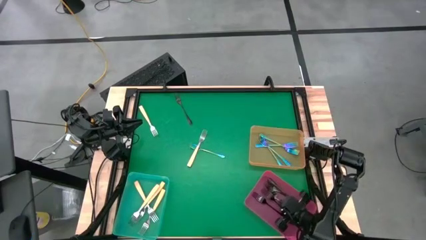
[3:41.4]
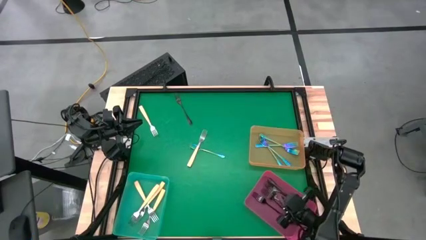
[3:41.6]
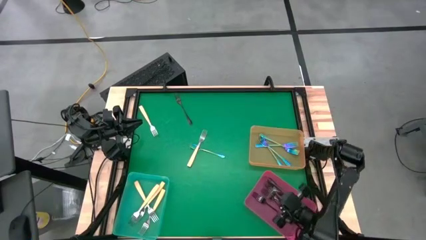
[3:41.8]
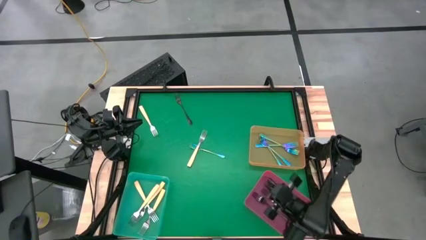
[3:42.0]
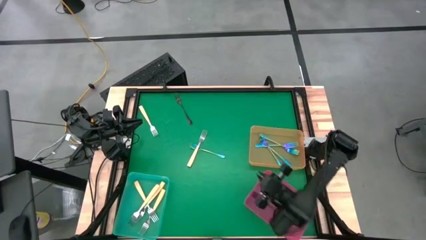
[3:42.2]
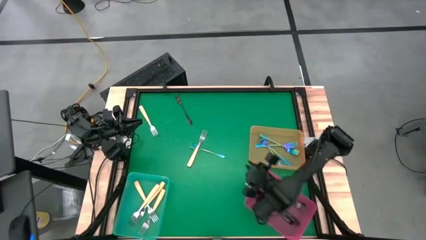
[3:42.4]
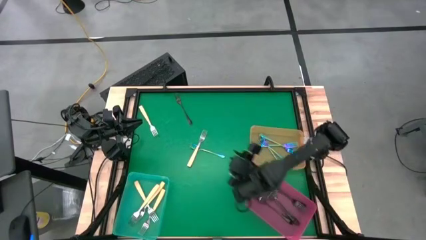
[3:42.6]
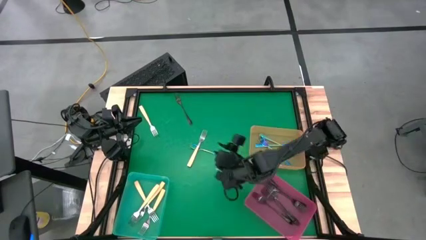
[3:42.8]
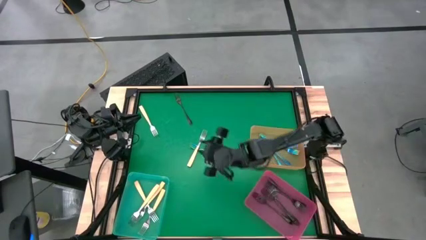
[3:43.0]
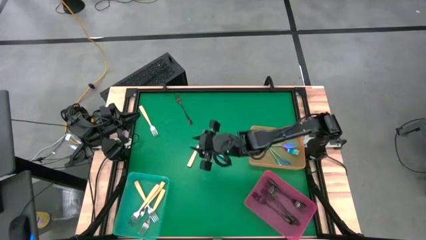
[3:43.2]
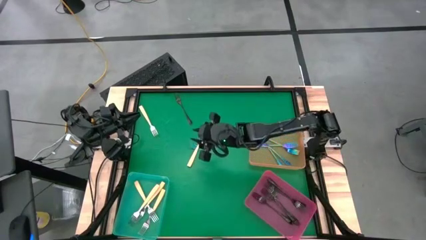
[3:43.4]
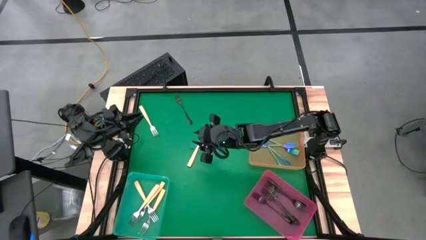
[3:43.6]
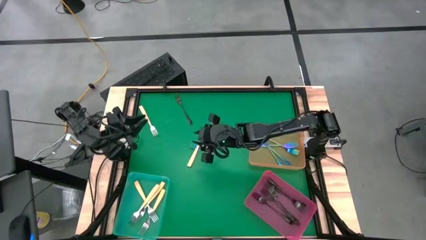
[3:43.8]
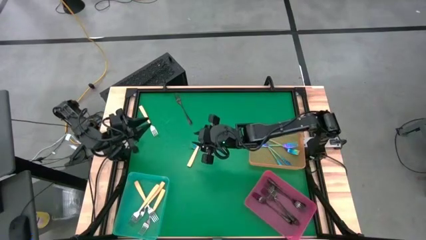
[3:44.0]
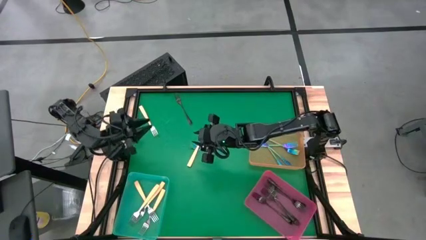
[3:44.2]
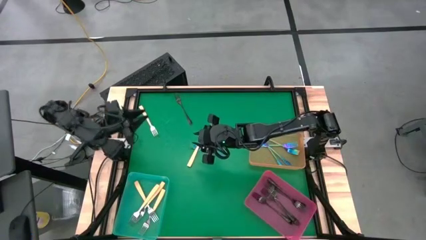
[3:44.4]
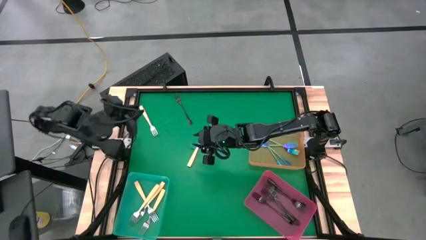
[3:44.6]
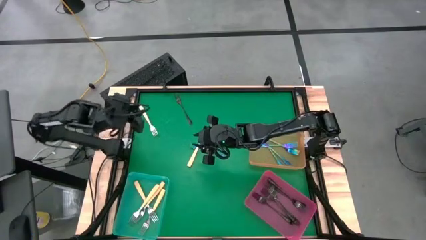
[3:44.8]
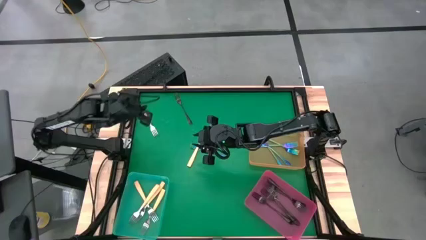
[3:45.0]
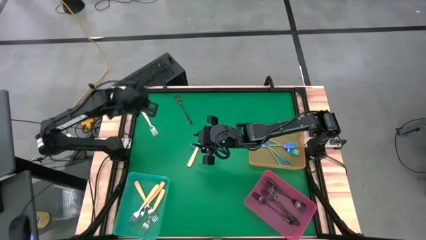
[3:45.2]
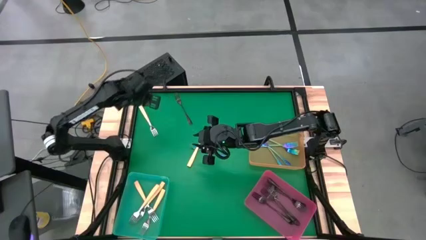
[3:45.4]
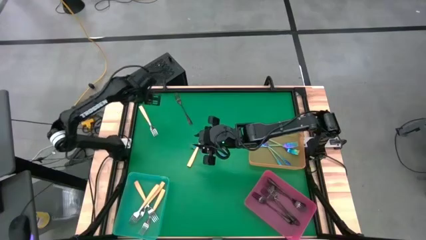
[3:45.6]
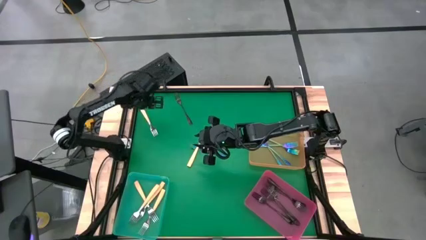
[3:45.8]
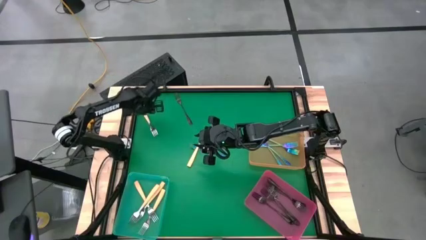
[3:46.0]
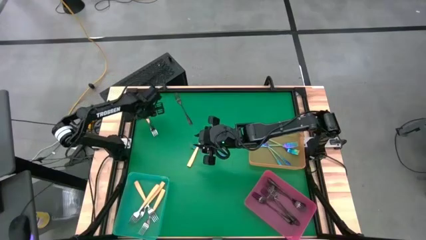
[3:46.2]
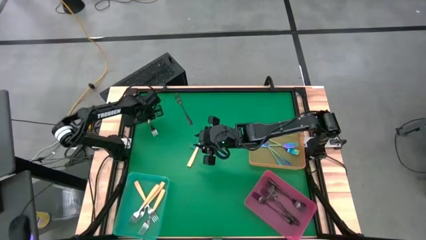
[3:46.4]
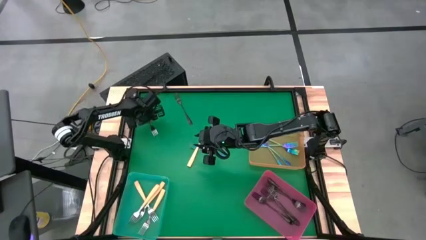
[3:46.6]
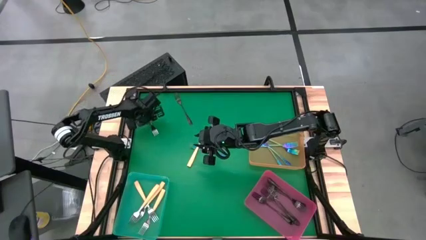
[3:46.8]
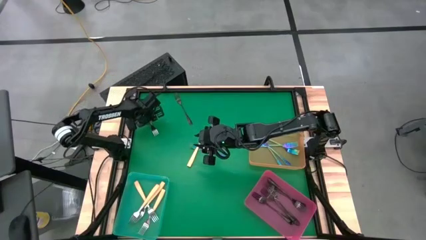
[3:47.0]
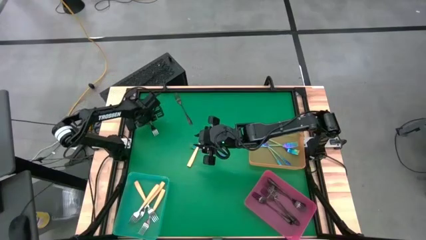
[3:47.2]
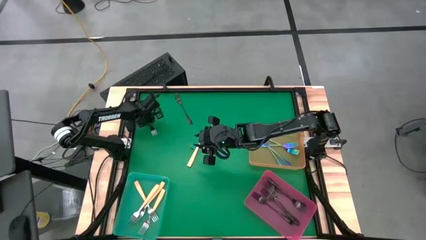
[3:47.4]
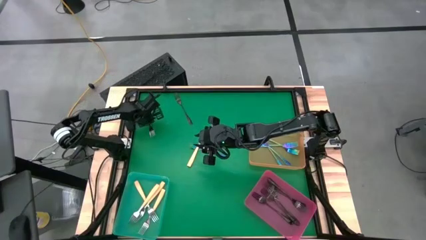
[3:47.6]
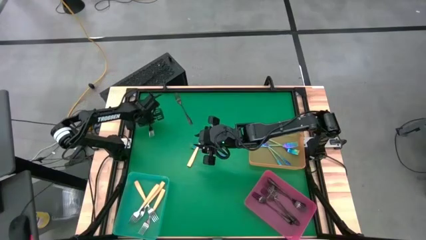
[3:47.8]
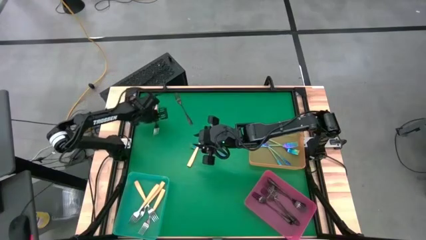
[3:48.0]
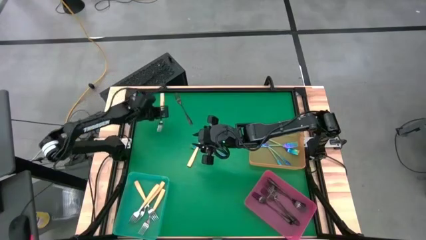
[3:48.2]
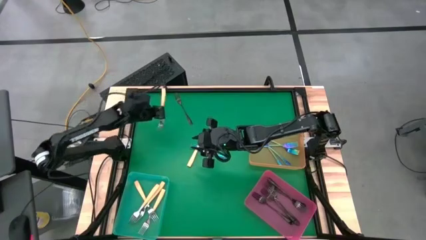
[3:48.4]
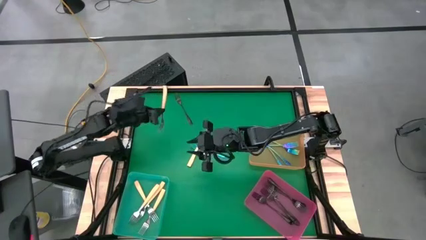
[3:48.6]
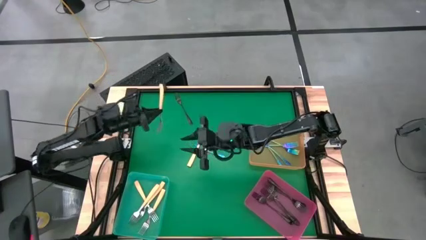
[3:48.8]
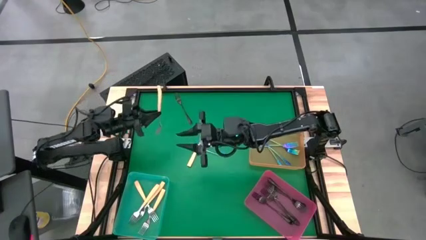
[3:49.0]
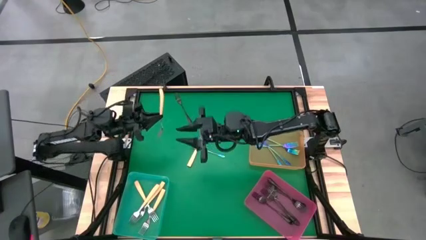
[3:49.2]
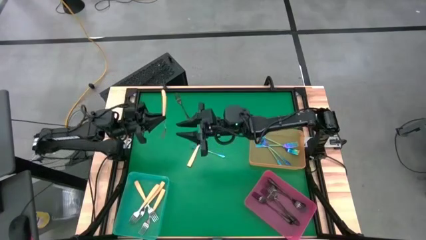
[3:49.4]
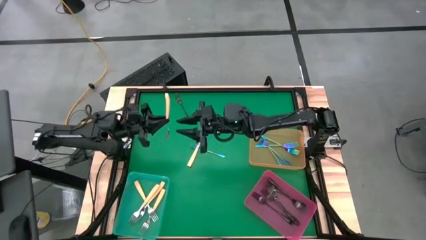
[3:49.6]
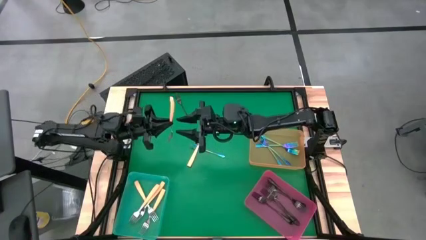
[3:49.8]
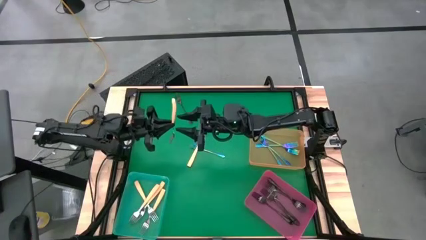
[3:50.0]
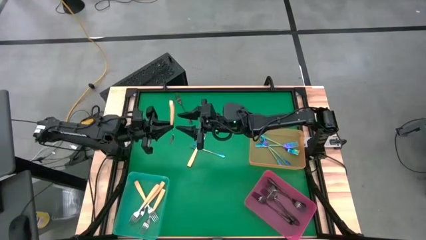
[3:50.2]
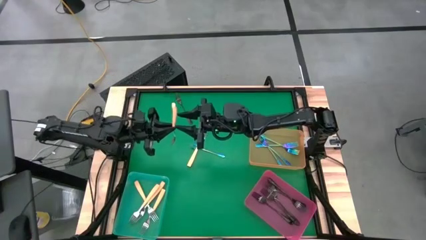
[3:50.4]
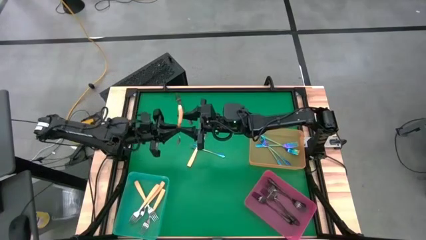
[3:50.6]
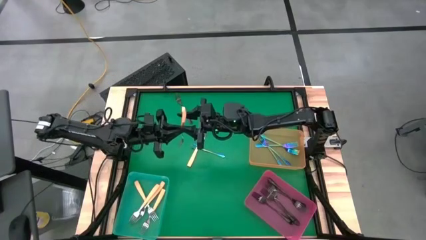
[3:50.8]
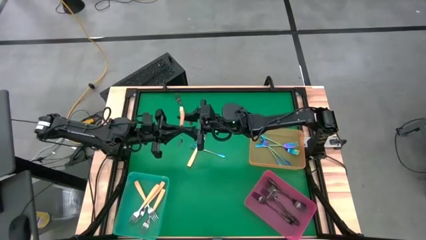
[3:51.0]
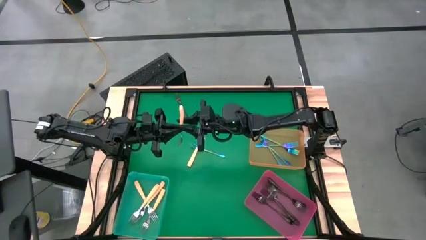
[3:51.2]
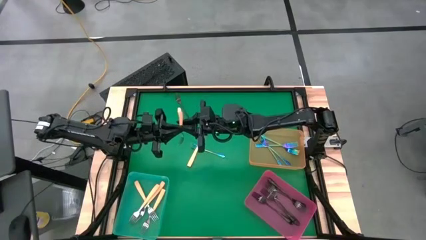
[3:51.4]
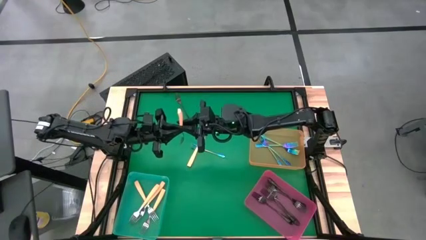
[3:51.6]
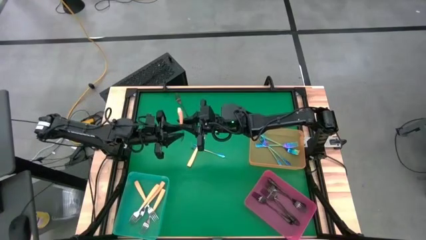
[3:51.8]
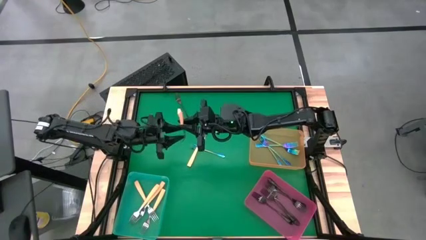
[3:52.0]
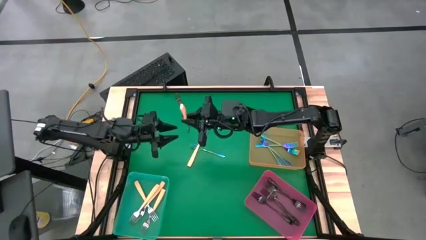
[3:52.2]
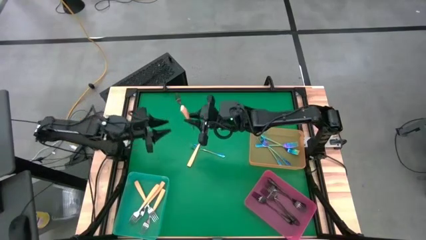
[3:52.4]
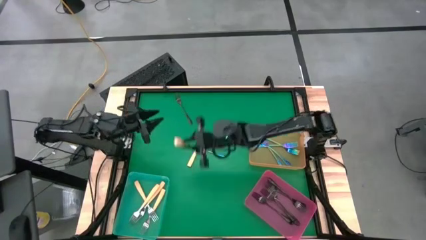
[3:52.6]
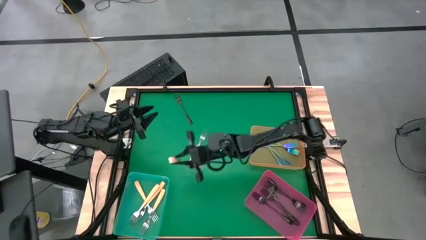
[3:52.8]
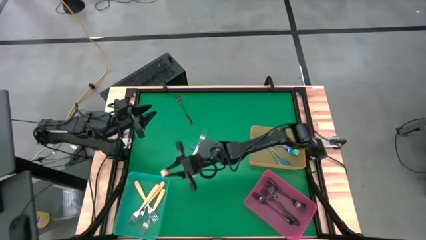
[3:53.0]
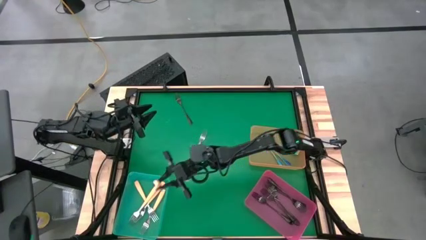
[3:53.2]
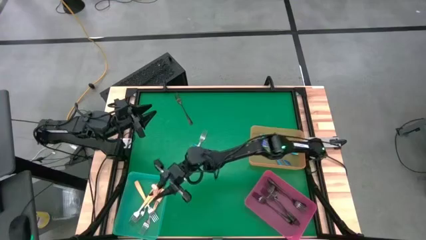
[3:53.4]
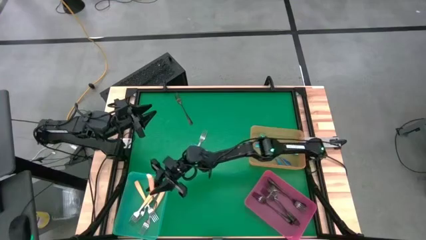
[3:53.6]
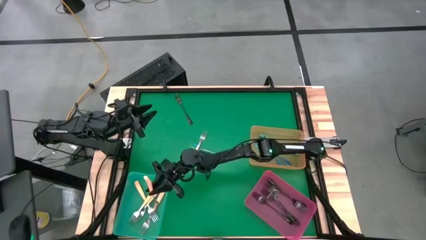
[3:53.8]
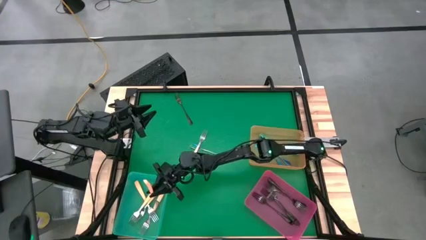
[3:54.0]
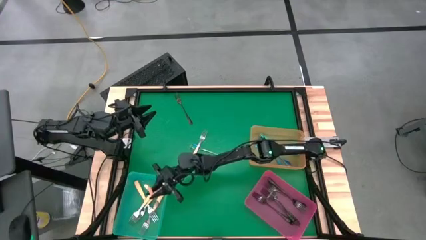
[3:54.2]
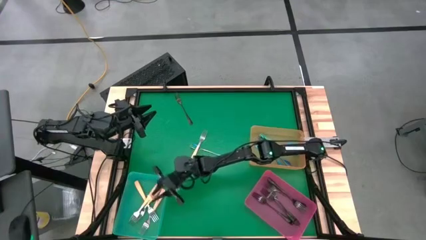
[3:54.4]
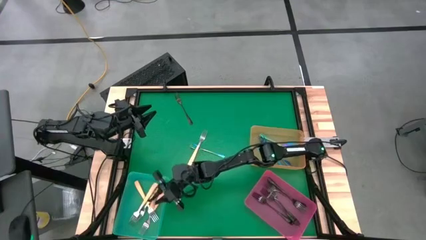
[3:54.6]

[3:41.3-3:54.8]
Task: Sort silverware by color (type)
Put the yellow fork into the blue bin

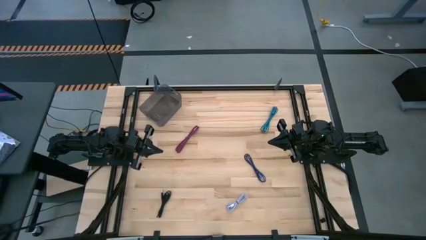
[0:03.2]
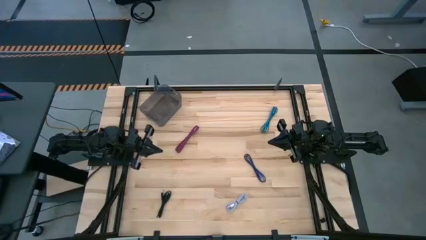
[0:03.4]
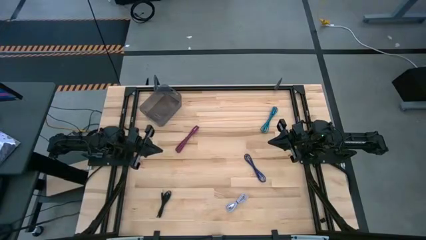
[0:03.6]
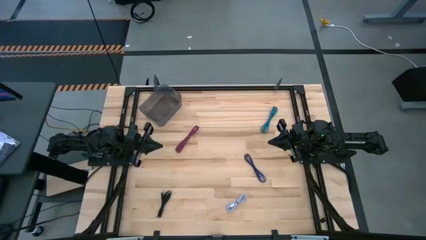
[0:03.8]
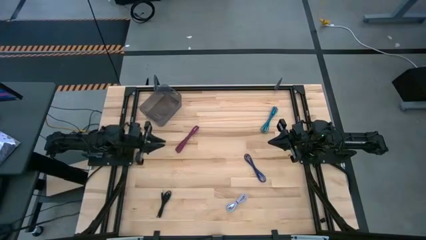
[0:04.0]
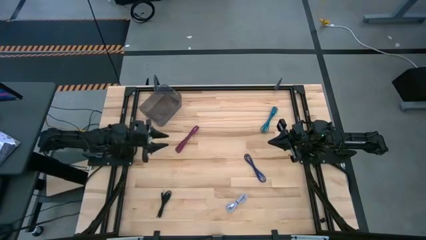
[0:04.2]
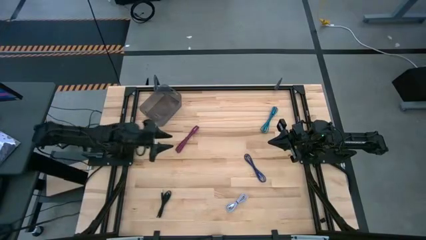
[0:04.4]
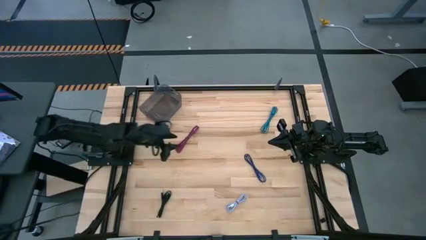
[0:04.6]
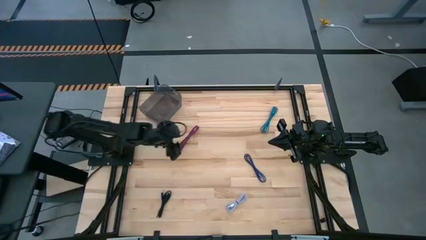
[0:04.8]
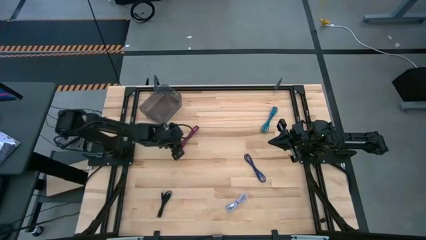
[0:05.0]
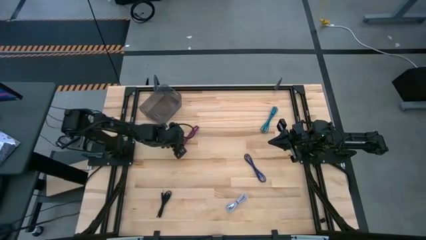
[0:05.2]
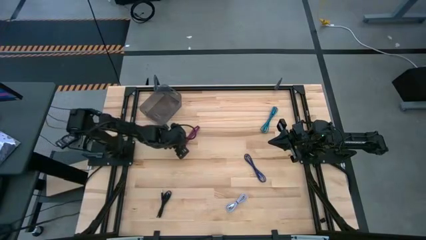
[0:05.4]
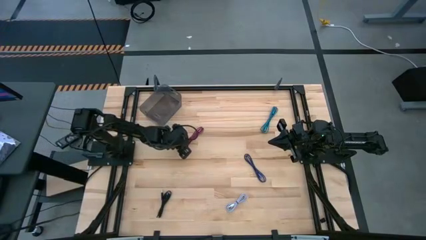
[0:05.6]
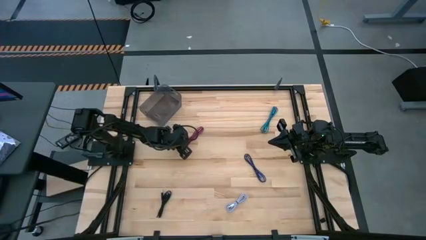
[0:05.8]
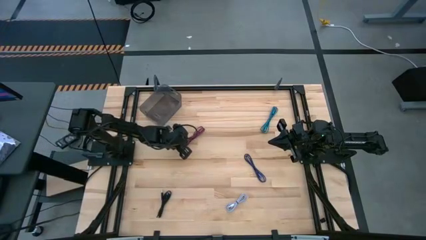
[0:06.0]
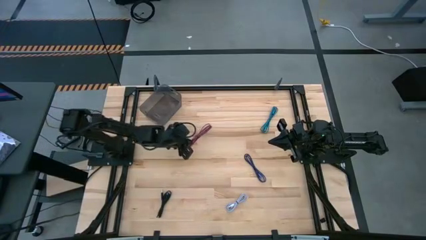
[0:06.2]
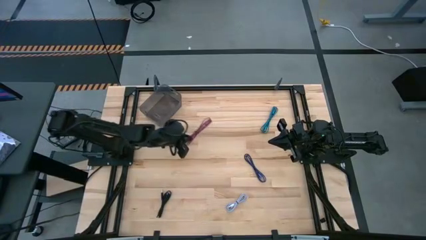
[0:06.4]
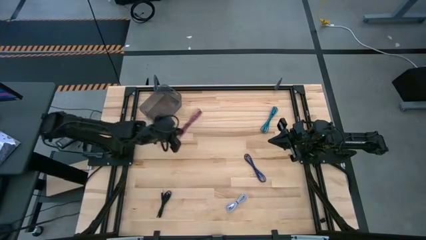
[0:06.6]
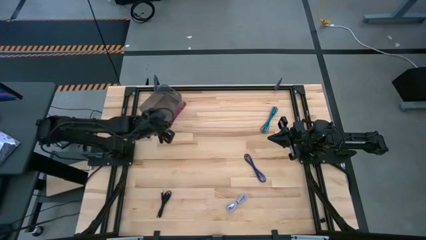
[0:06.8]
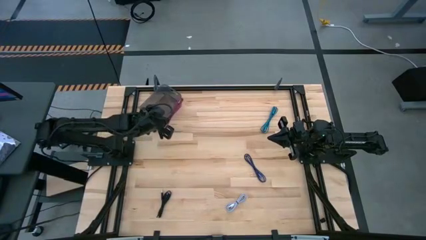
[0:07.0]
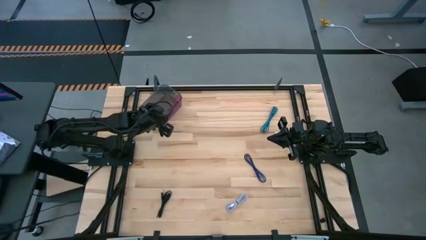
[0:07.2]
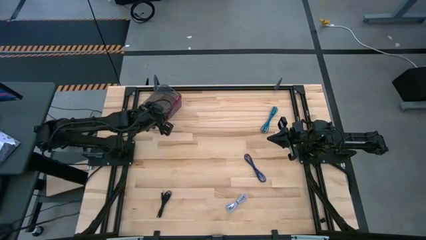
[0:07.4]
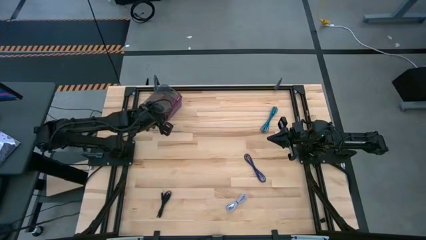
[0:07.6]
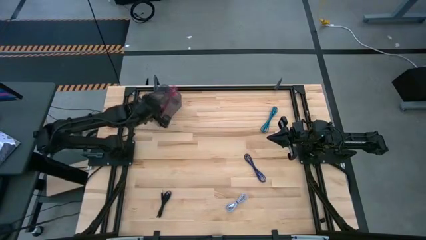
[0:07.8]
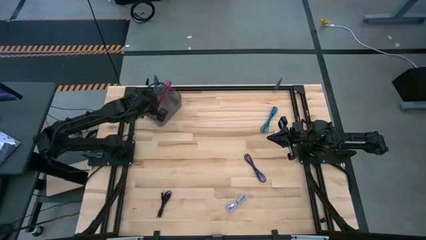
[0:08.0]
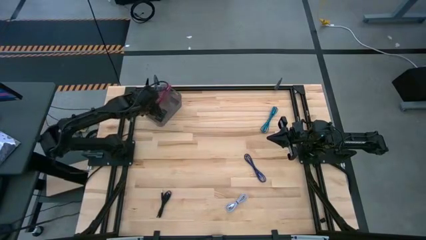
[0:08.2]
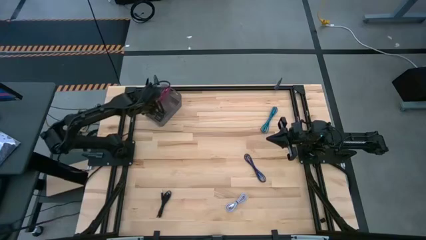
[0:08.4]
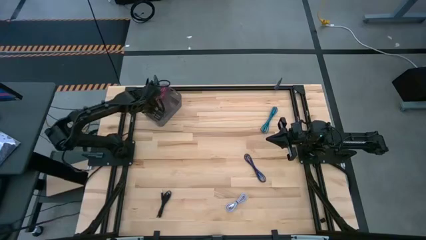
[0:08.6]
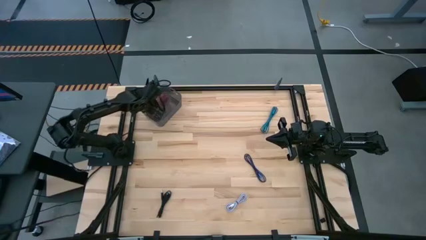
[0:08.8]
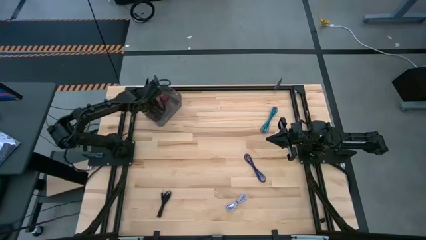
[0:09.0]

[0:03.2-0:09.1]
Task: Pick and place USB-C Cables
Put the pink USB cable into the black bin
